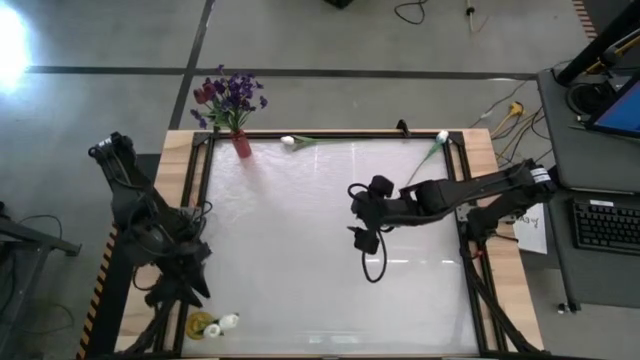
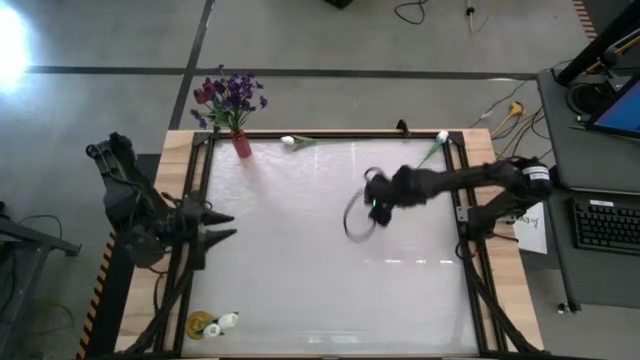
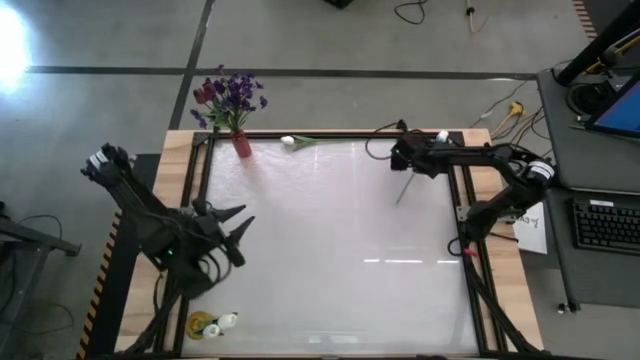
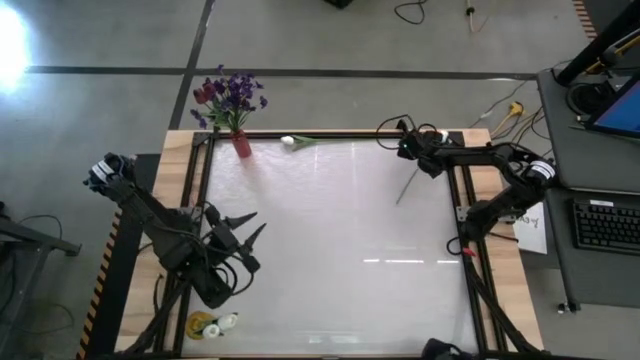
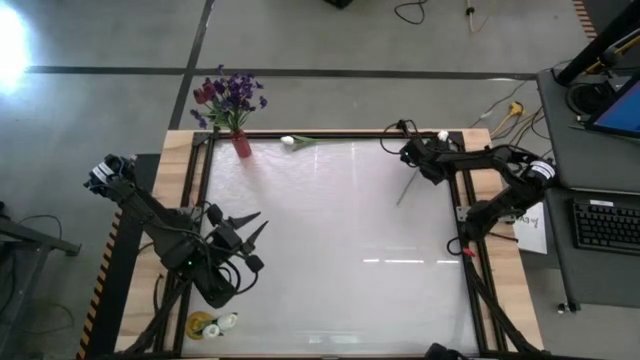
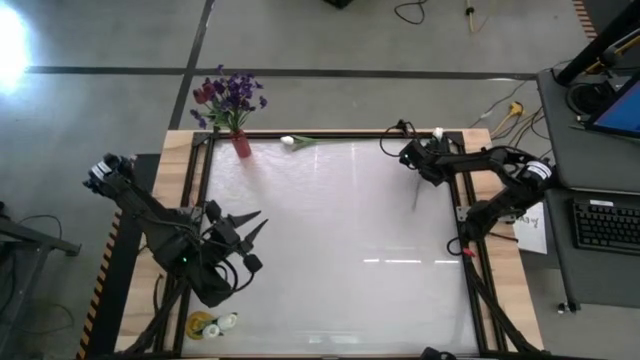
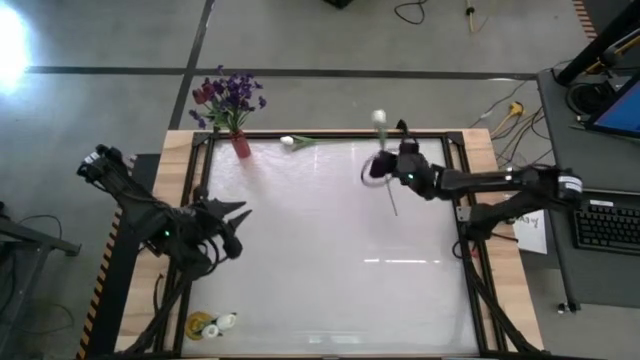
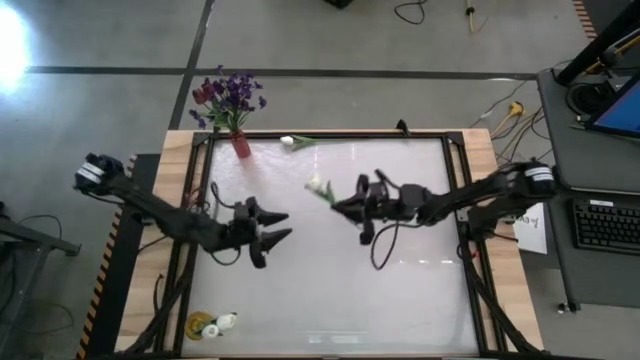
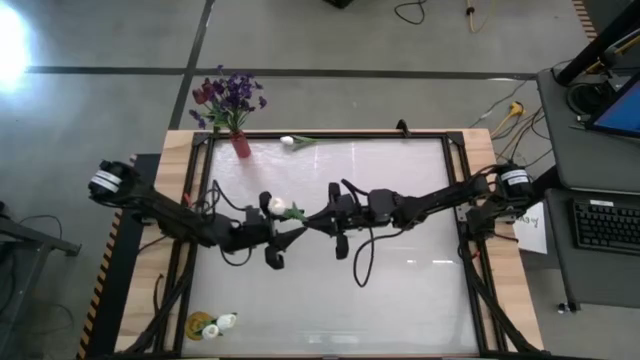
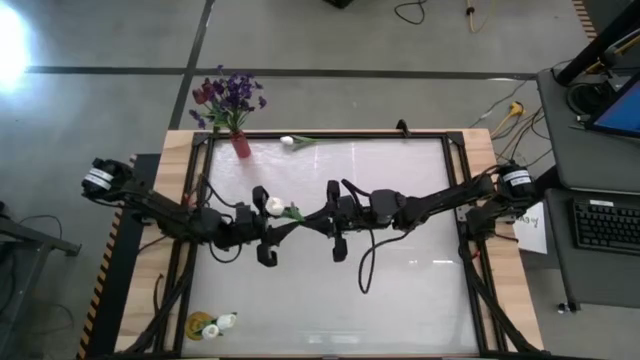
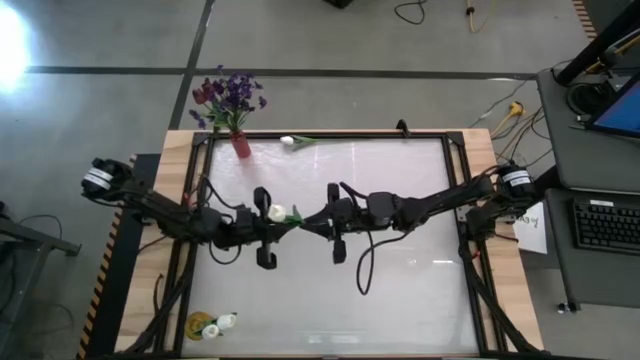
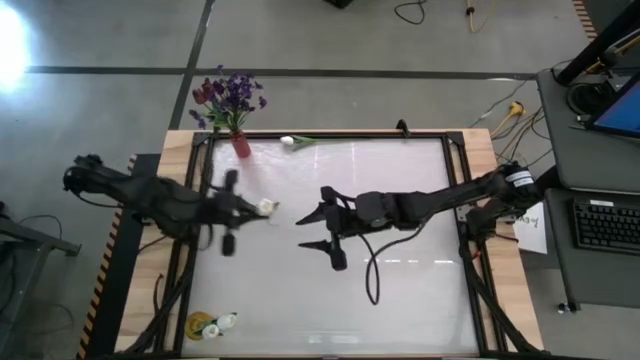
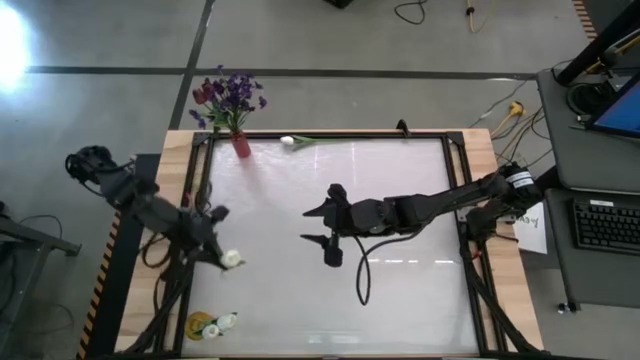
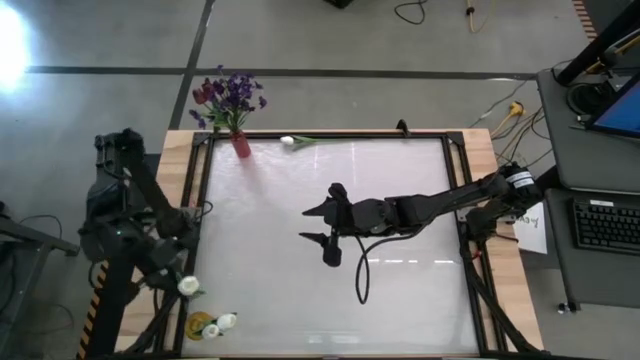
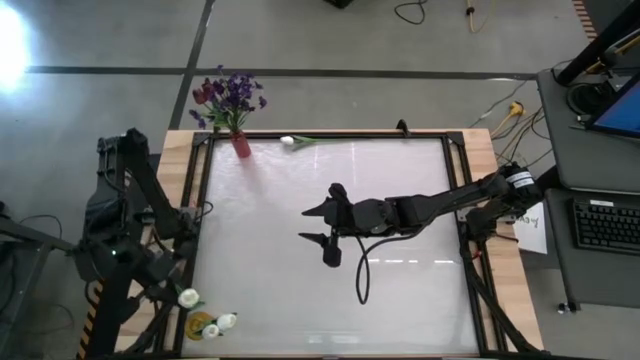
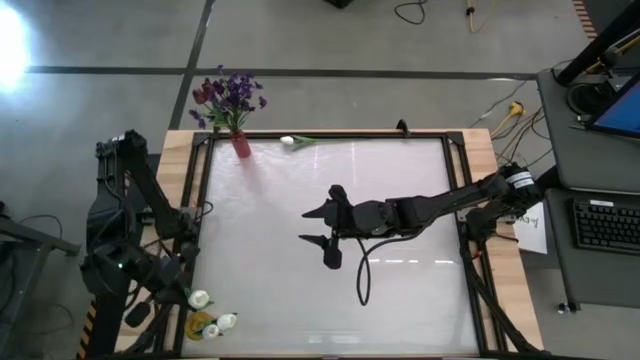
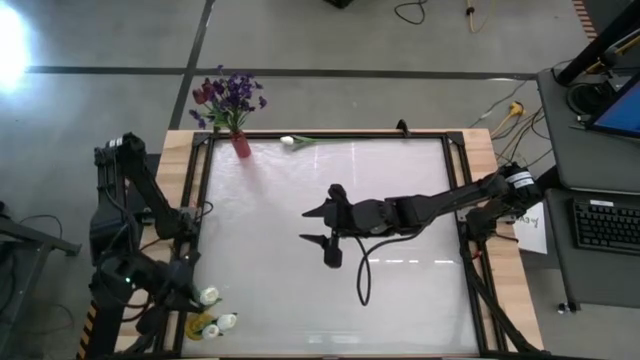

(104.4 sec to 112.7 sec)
Task: Sort flowers into vase by color
Put the right white flower into the yellow vase

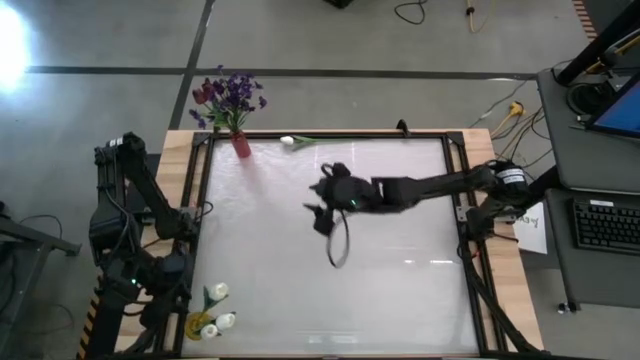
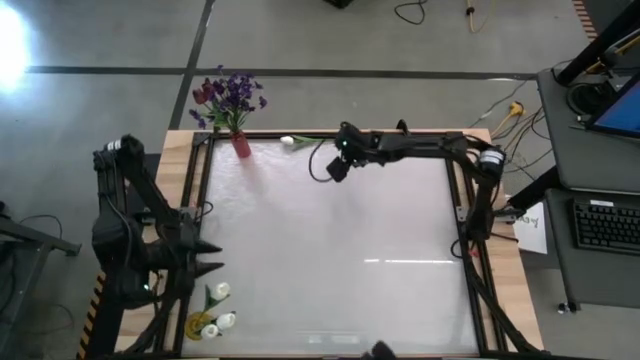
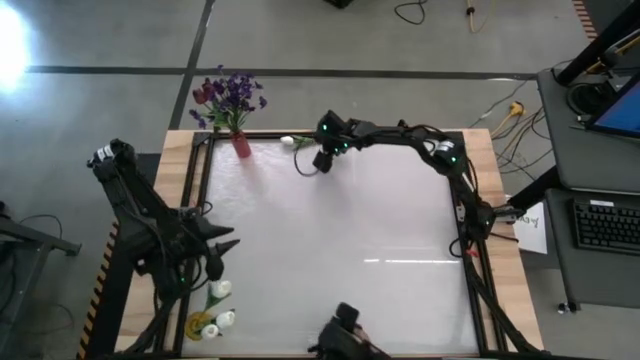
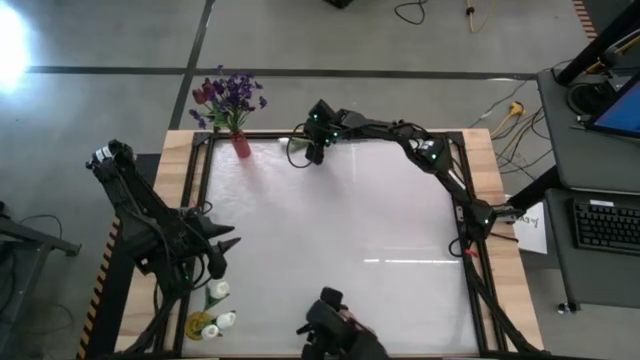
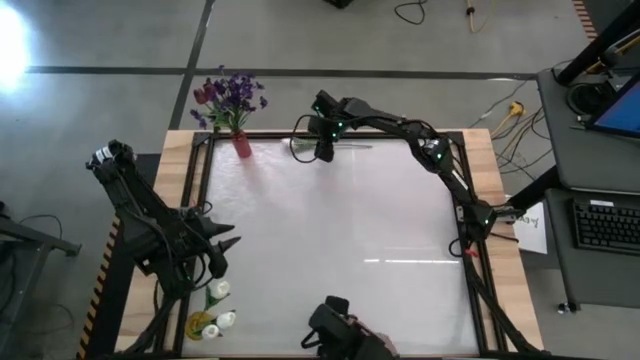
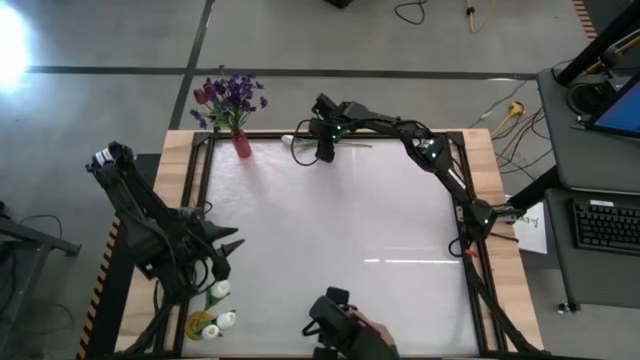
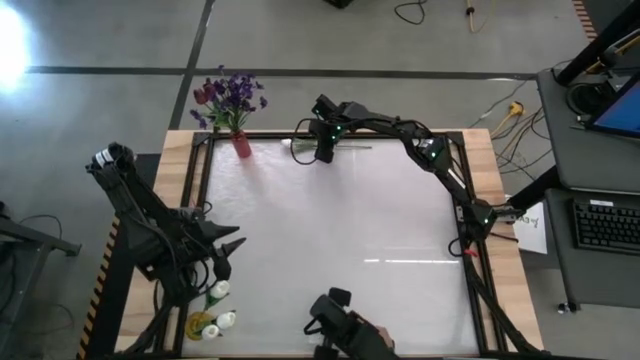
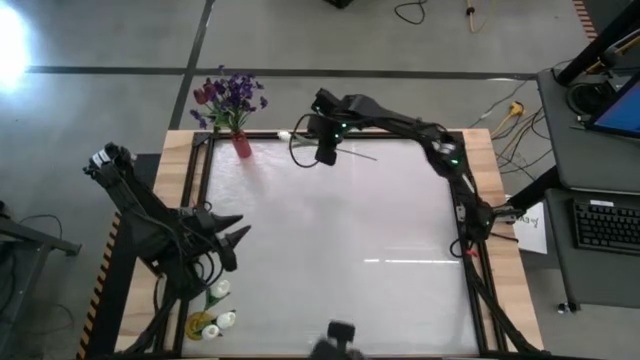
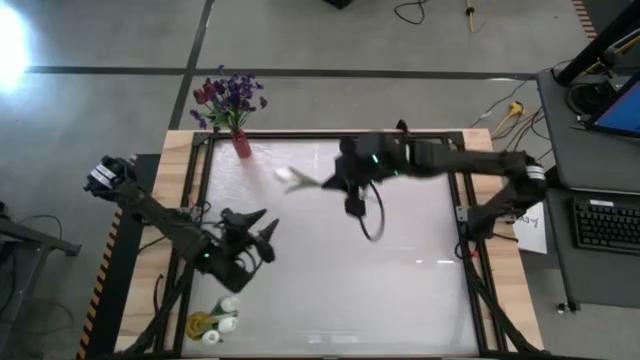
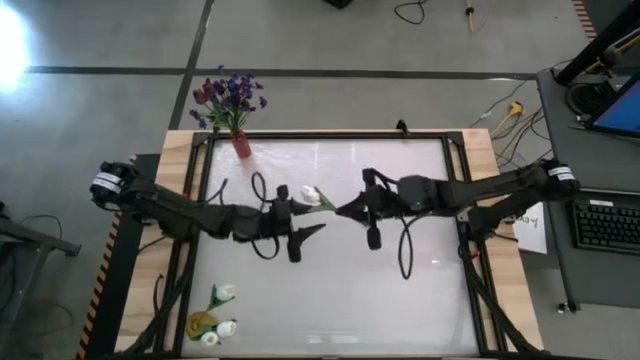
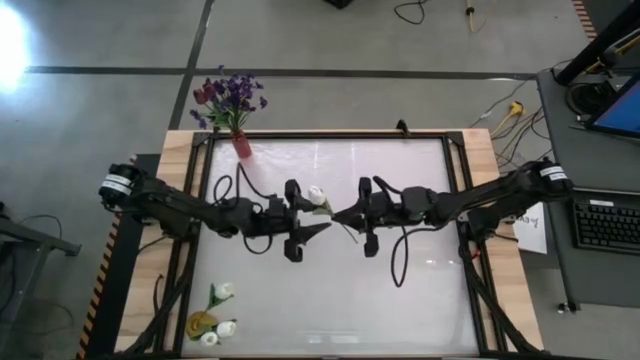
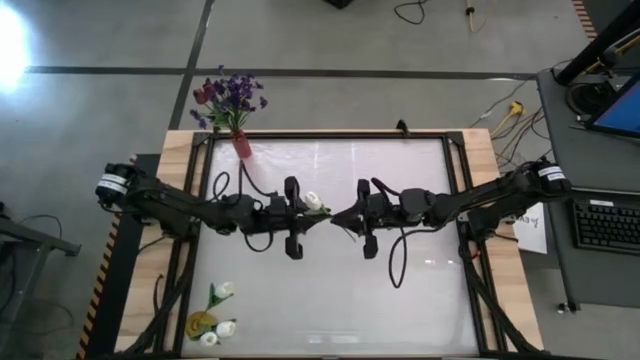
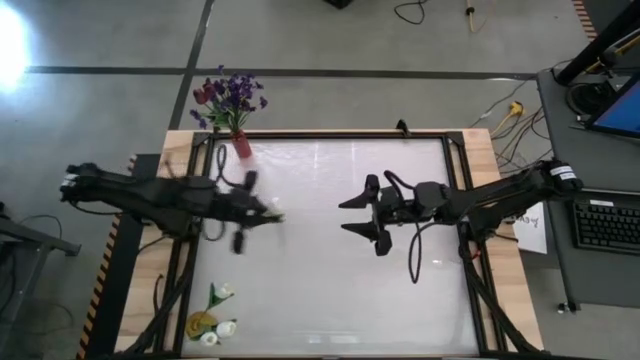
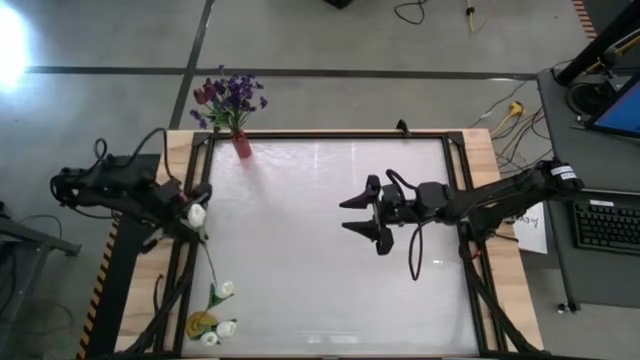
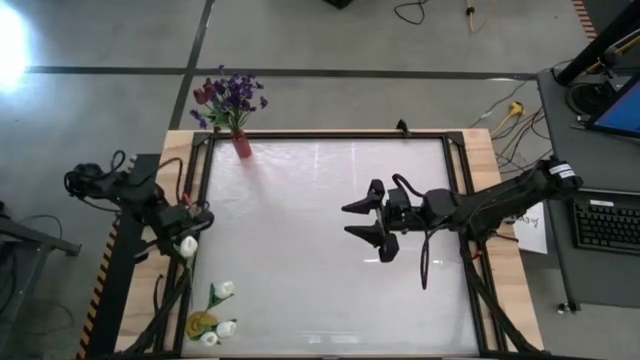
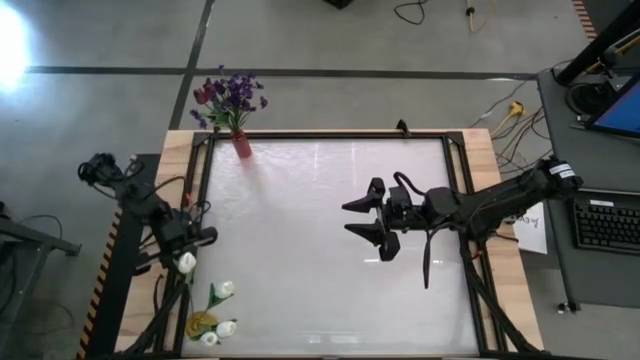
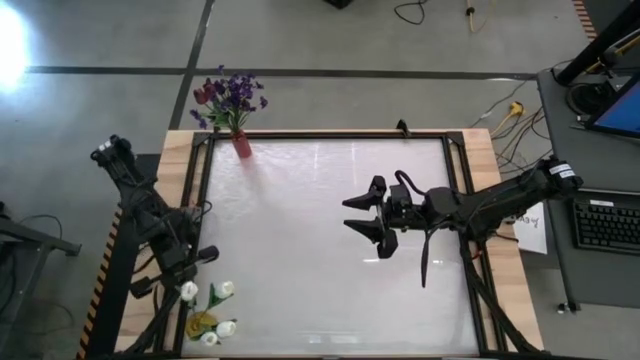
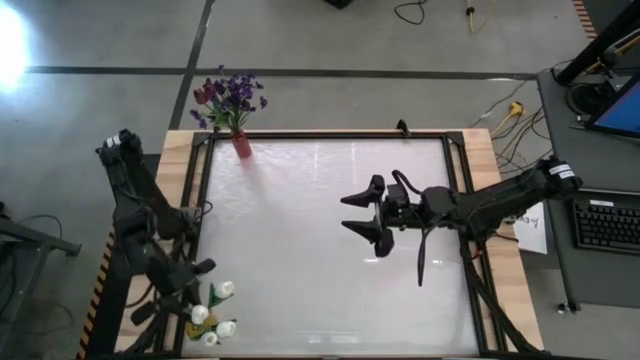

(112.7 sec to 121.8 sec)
Put the white flower into the yellow vase

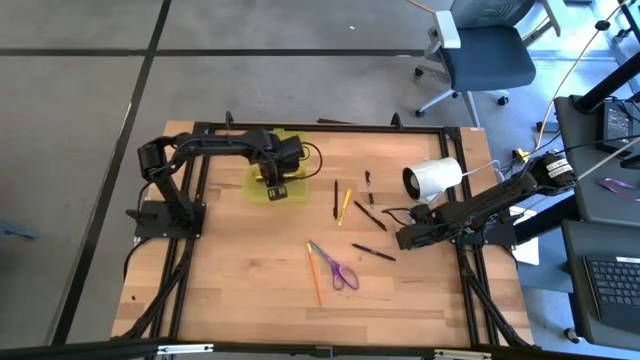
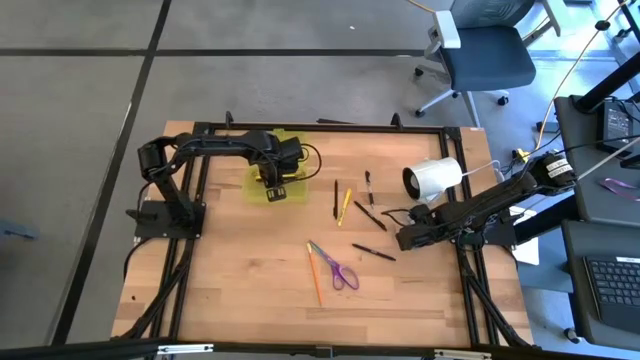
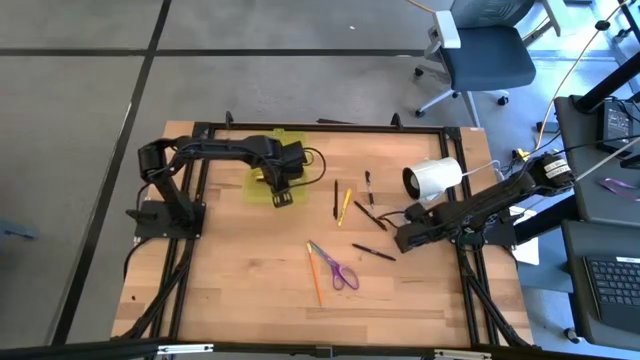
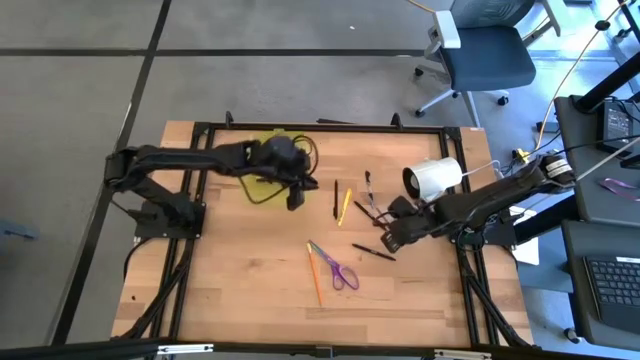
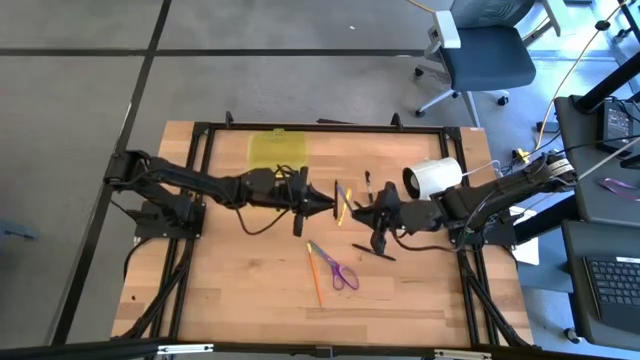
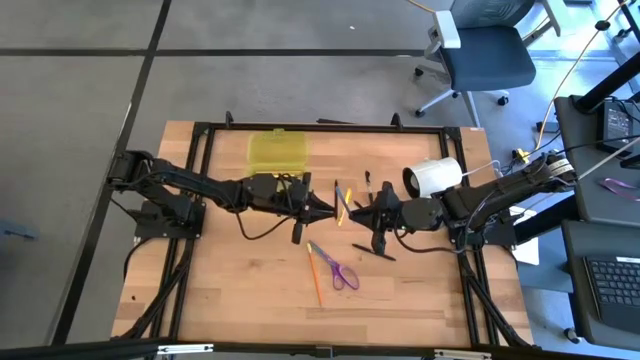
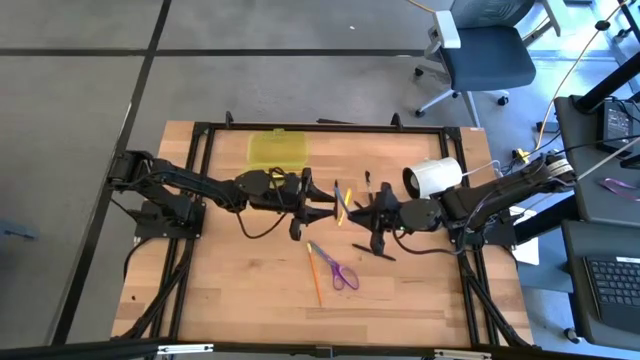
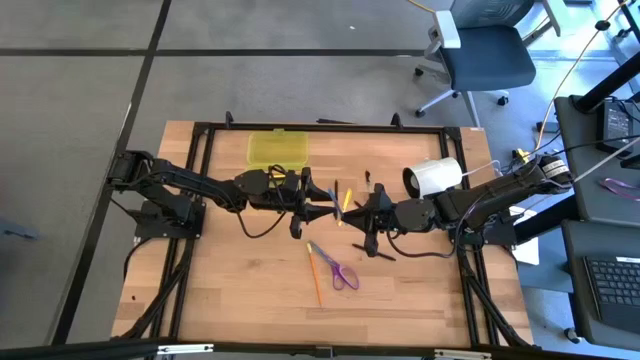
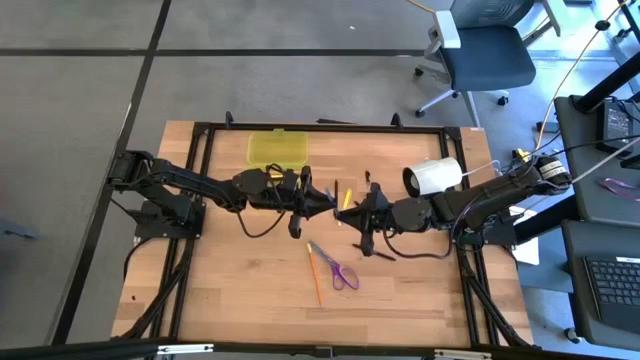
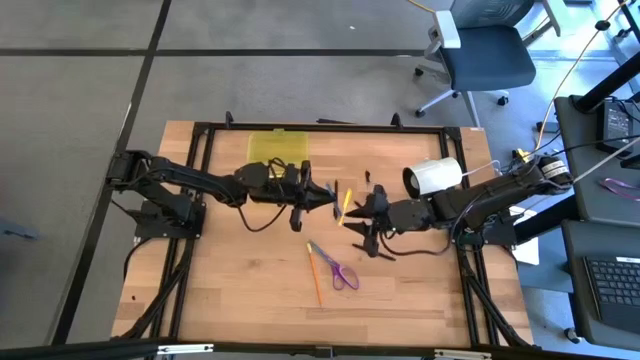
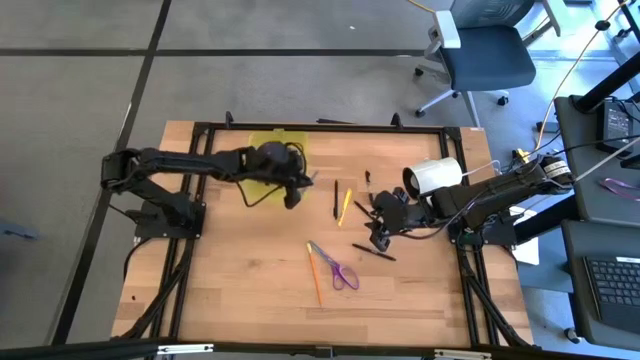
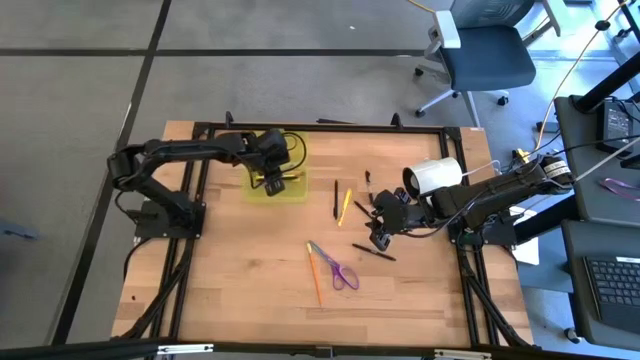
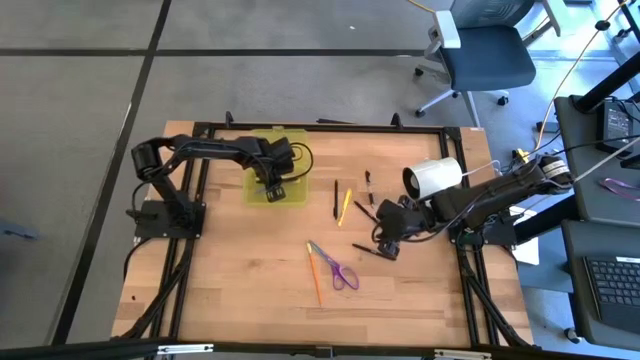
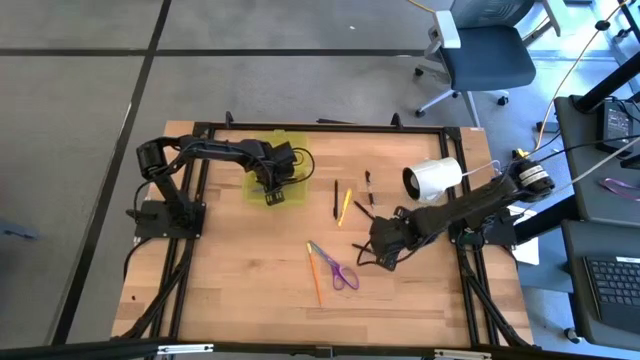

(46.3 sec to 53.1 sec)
Task: Pick & place school supplies into a supply box
Put the blue pen into the yellow supply box
